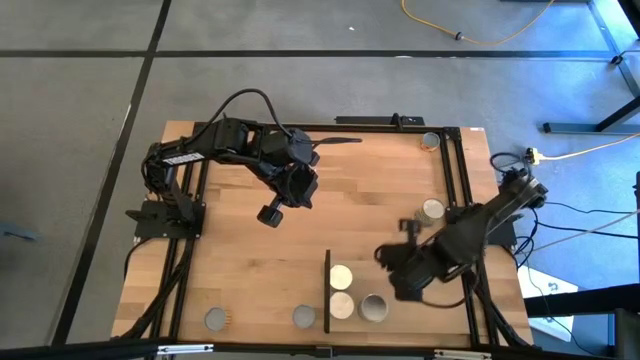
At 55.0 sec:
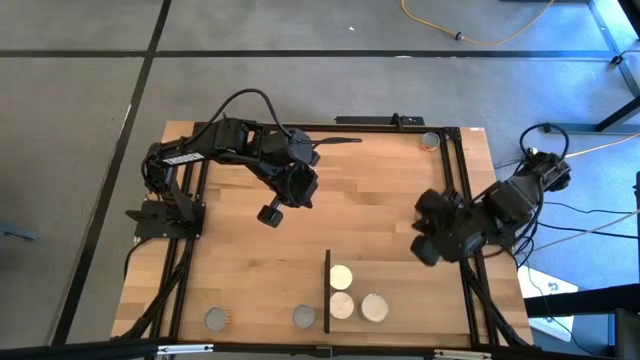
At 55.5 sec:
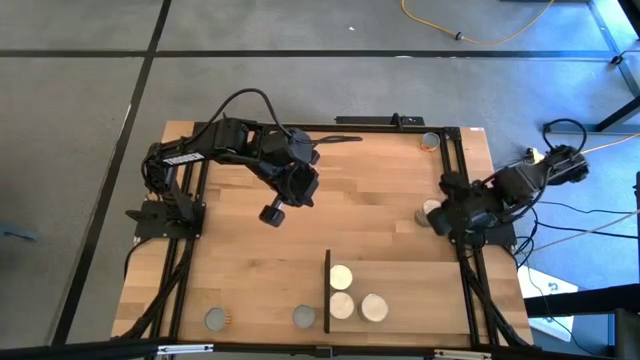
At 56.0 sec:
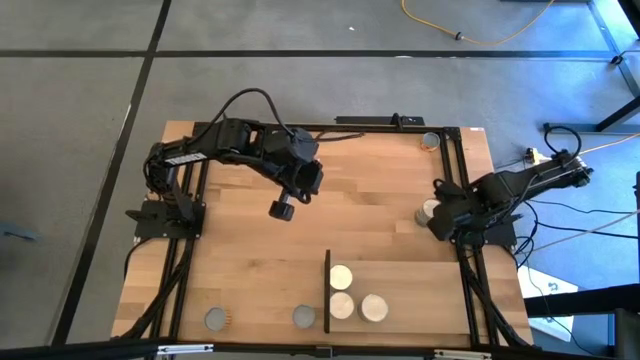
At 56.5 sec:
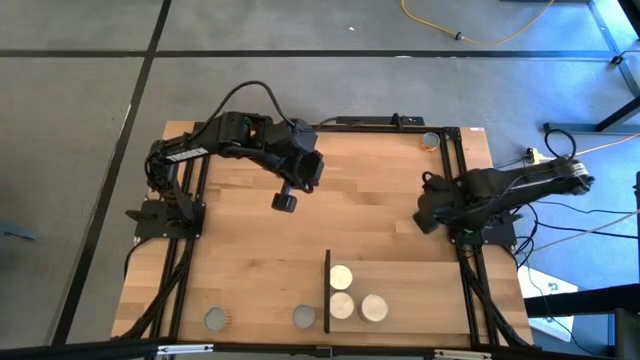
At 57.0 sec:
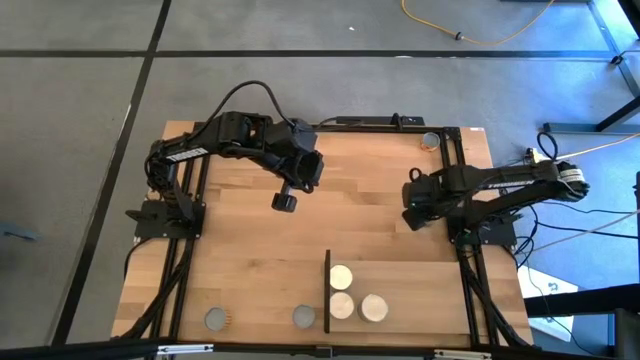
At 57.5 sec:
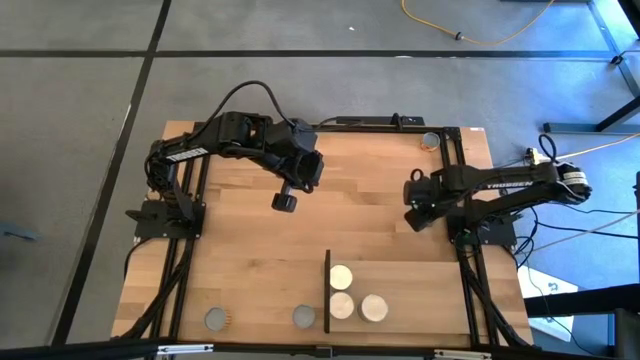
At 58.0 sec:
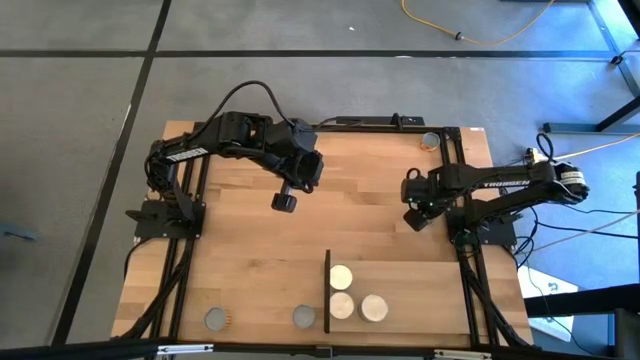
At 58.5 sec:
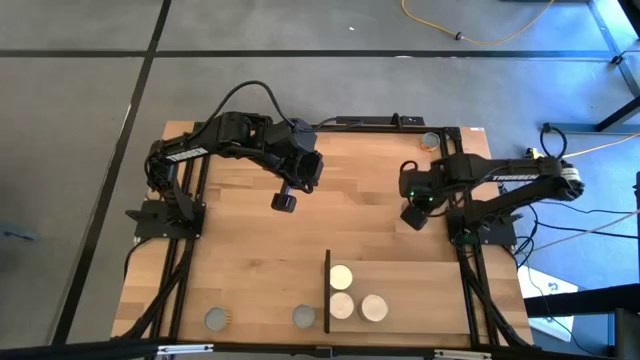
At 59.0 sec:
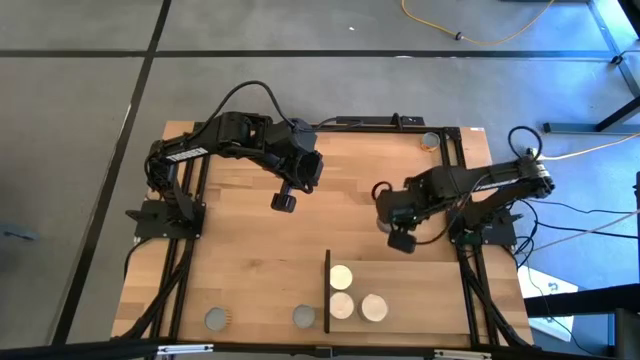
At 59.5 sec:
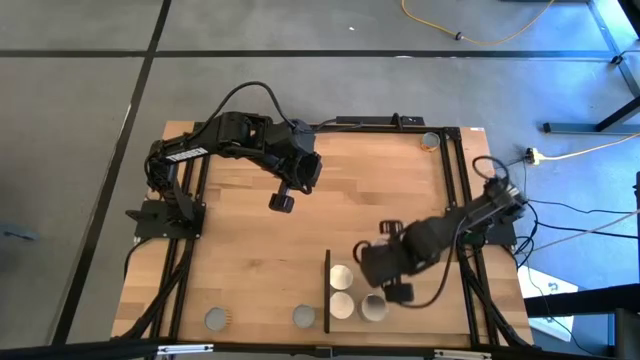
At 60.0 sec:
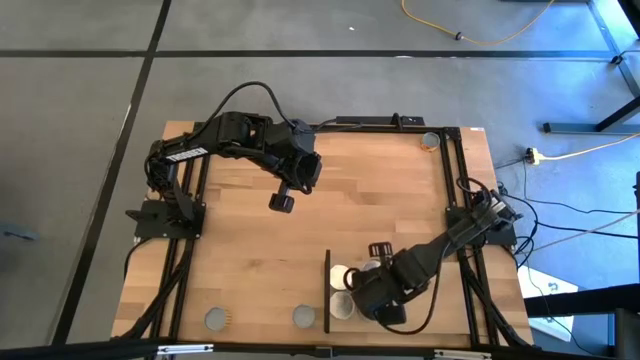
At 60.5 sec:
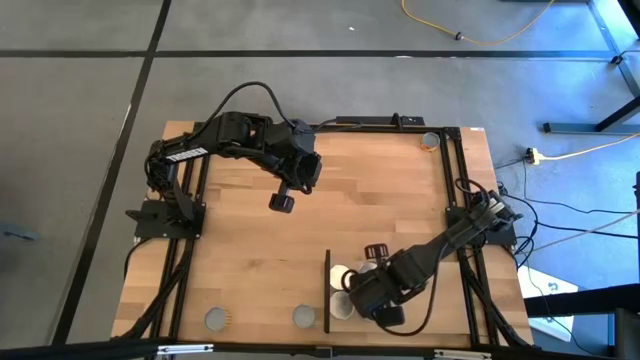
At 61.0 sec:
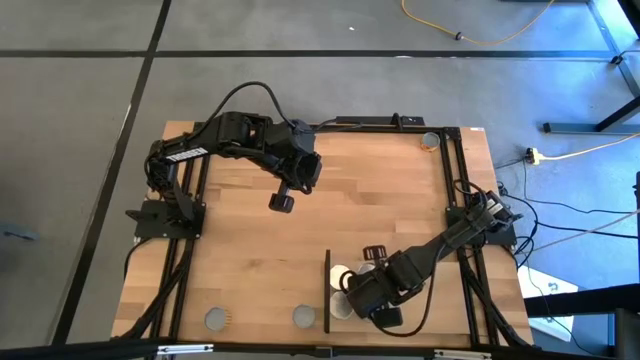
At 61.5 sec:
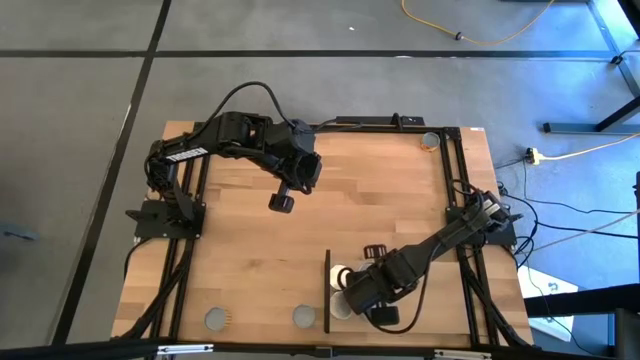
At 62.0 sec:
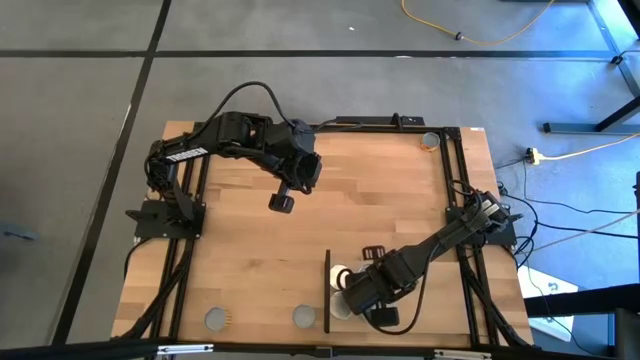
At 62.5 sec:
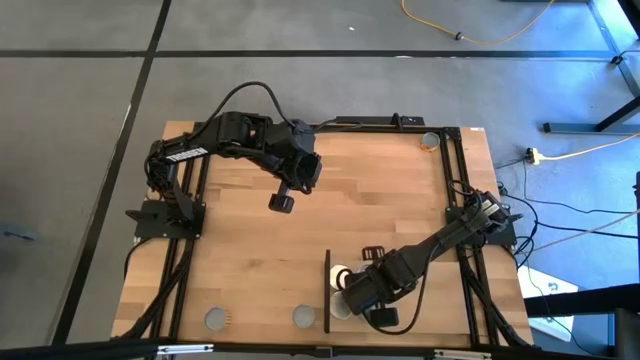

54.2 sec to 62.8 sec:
Task: Pick and place cans onto a shelf
Put the canned peas on the shelf

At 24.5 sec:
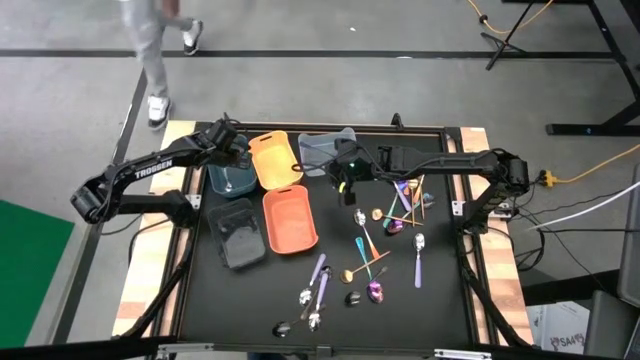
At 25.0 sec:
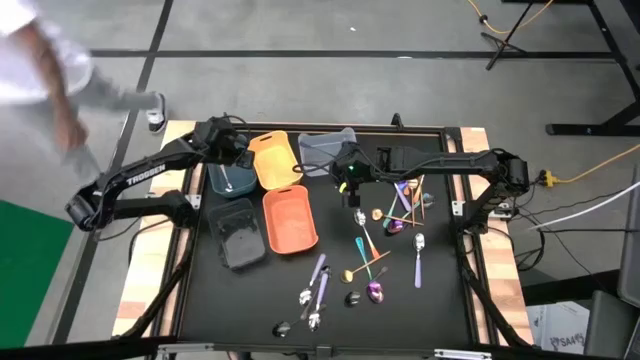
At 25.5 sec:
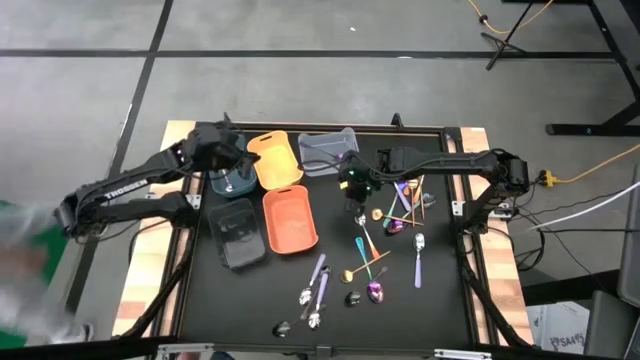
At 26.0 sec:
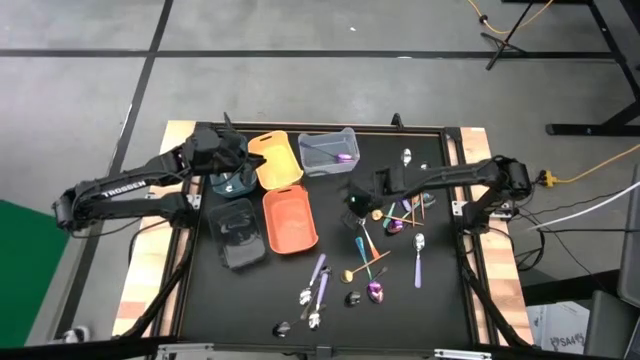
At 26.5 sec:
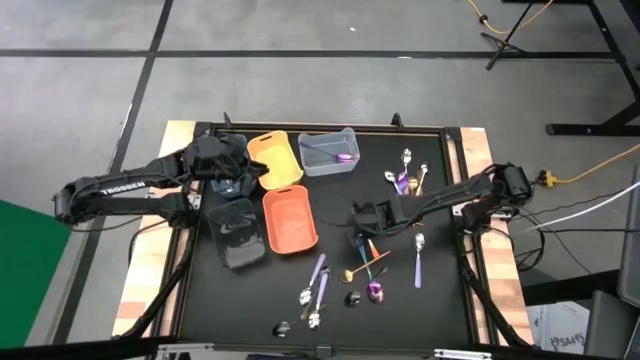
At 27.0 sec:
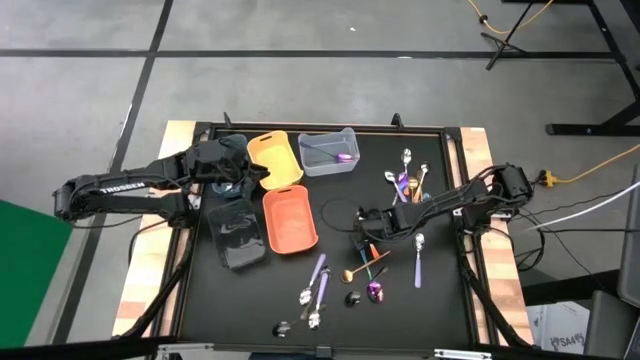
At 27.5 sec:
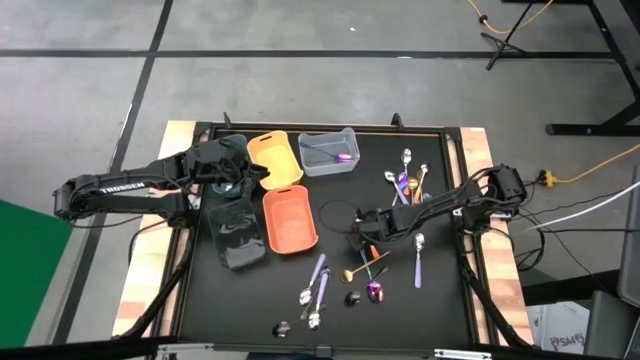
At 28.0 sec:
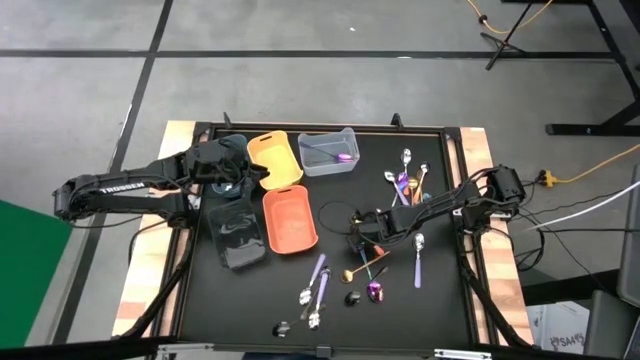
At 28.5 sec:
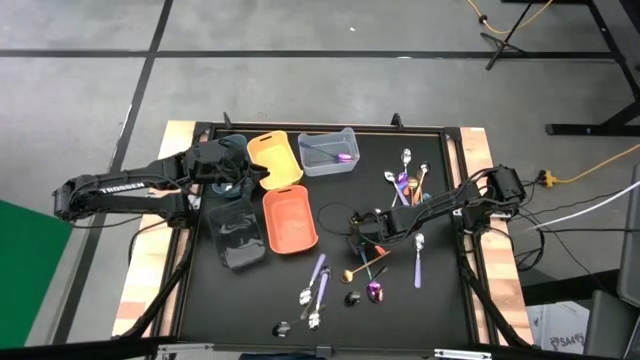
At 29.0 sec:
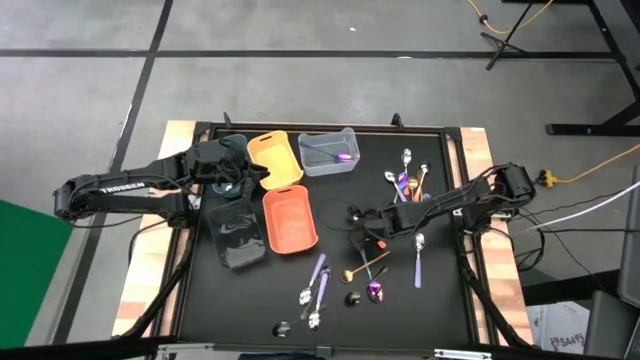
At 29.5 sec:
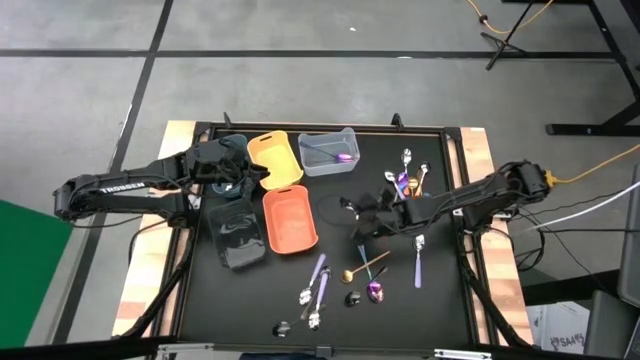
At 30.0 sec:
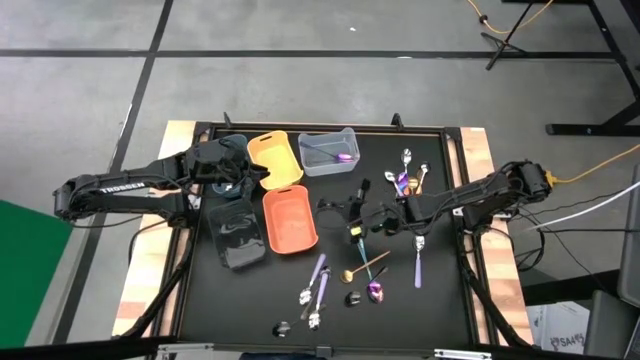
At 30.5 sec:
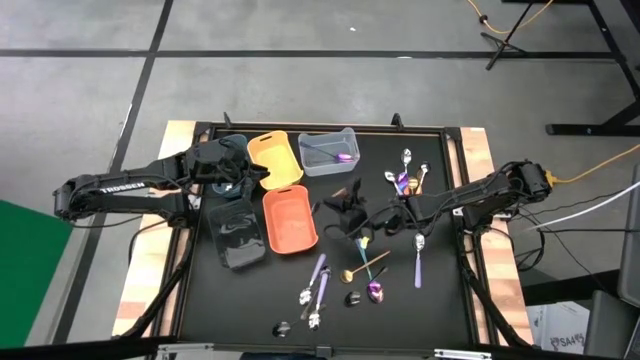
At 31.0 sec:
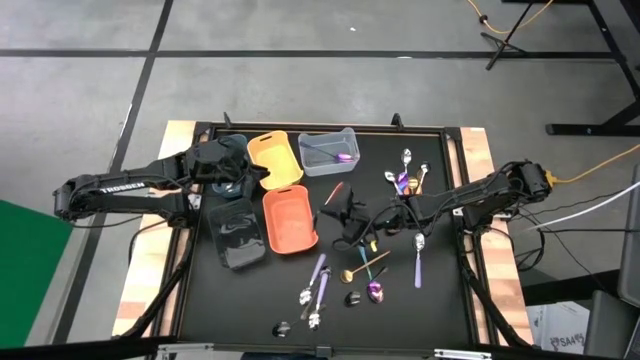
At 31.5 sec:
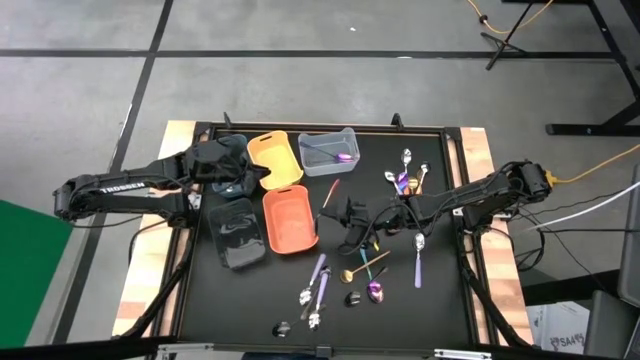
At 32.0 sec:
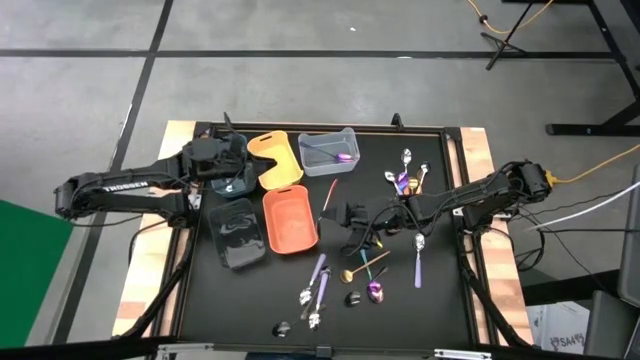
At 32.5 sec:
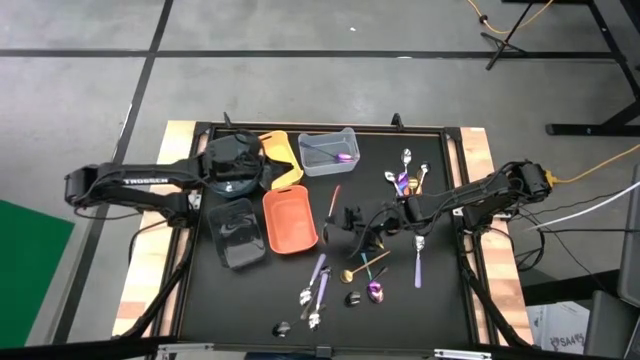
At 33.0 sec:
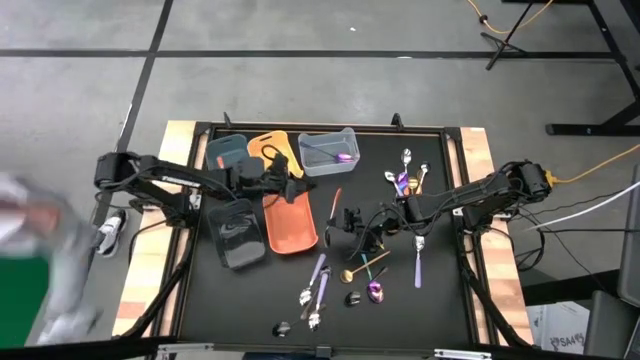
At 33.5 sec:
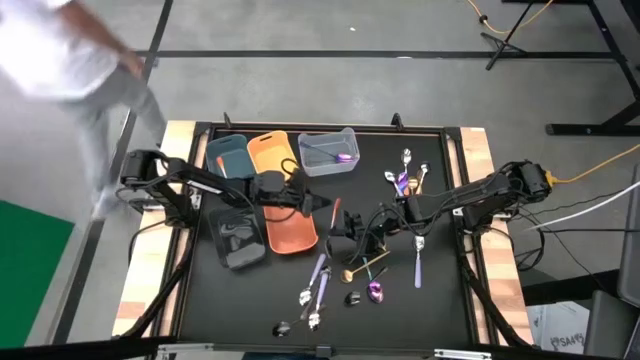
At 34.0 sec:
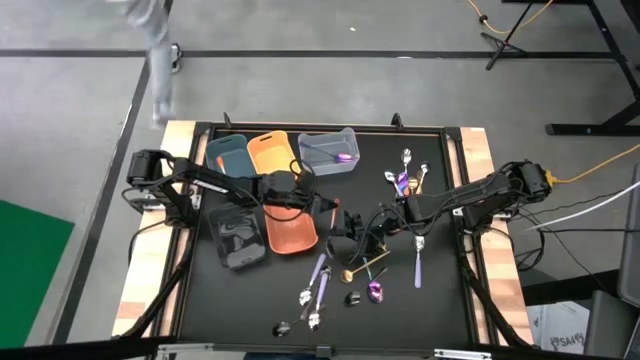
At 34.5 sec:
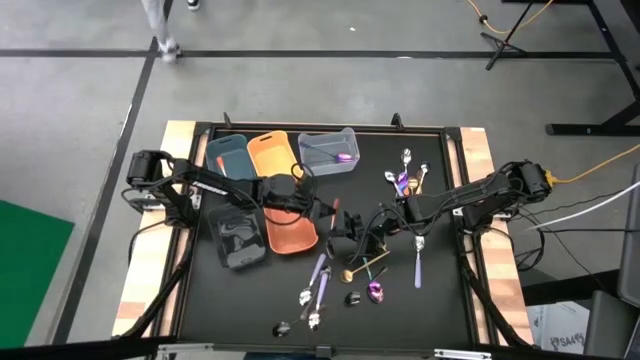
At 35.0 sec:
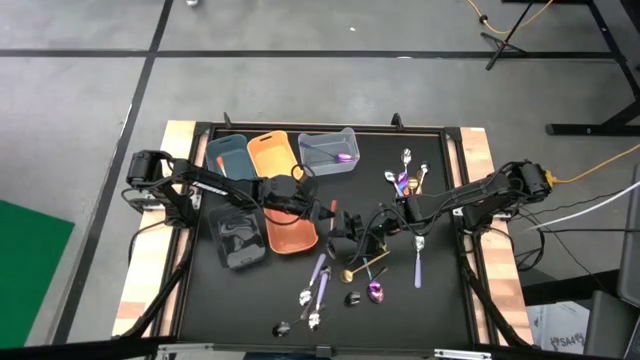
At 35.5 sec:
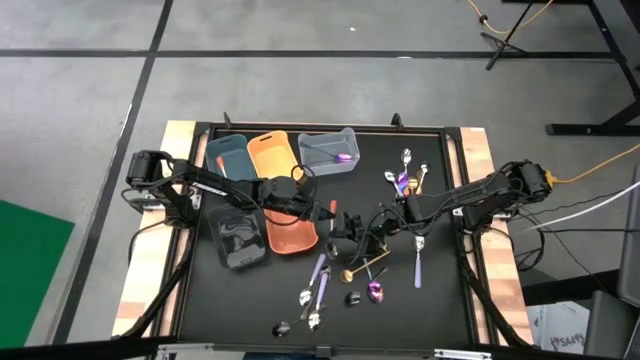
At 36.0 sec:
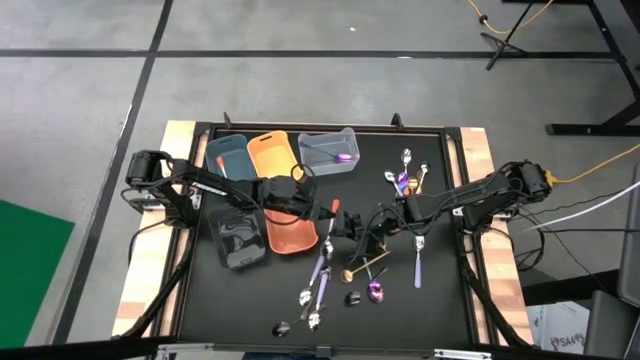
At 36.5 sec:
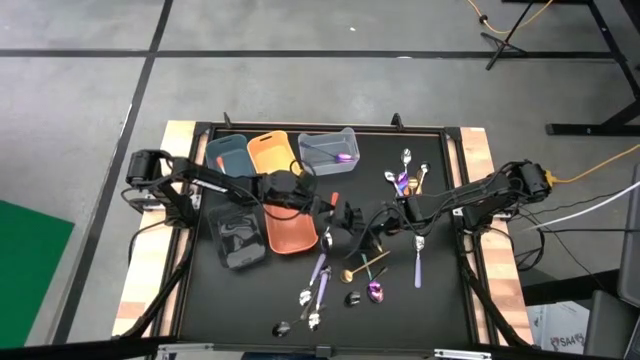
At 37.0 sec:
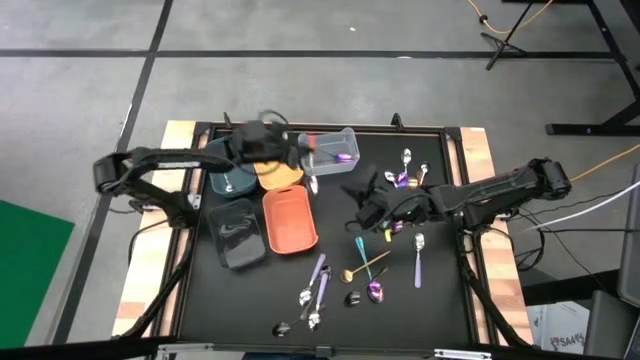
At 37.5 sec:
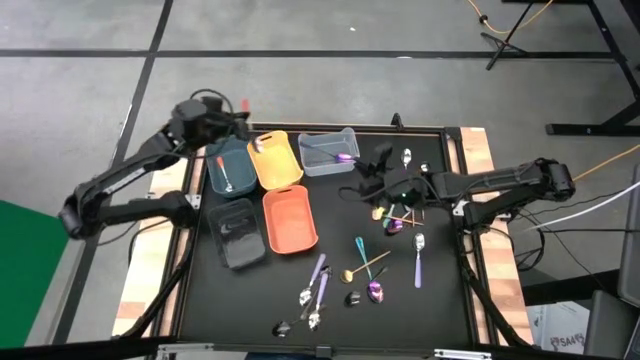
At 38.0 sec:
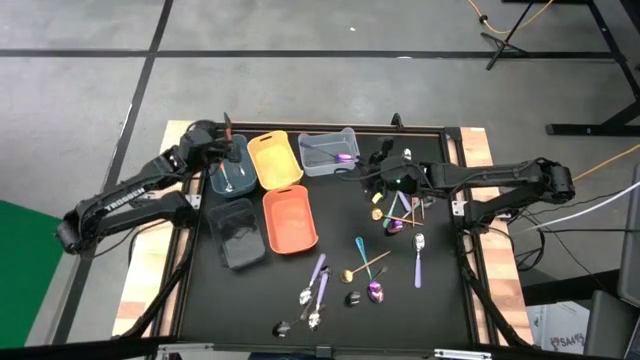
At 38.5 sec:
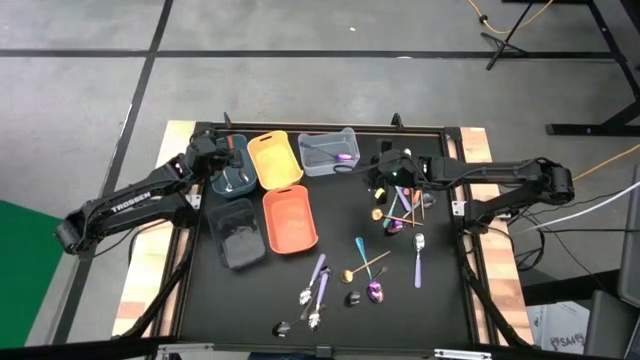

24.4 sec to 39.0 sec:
Task: Sort silverware by color (type)
Put the orange spoon into the blue bin
